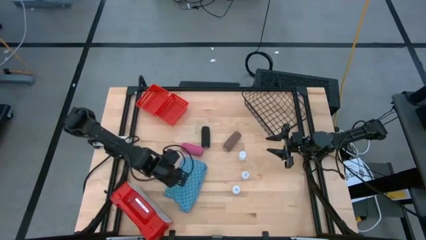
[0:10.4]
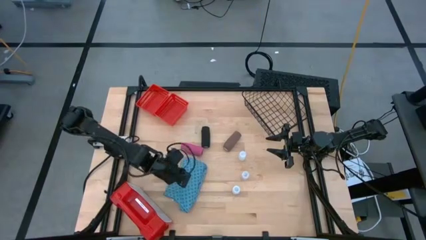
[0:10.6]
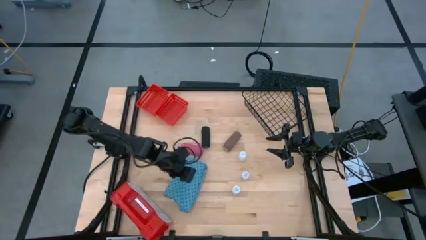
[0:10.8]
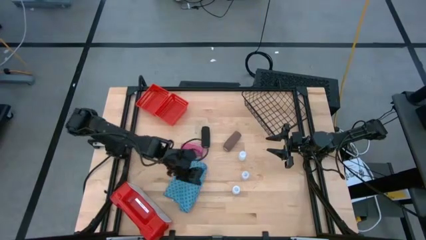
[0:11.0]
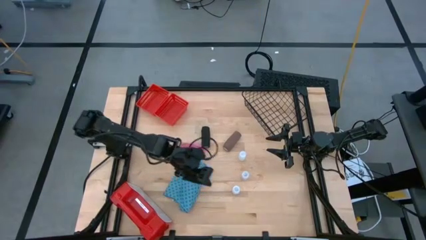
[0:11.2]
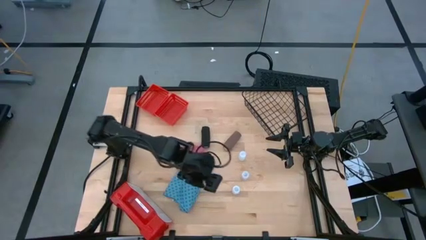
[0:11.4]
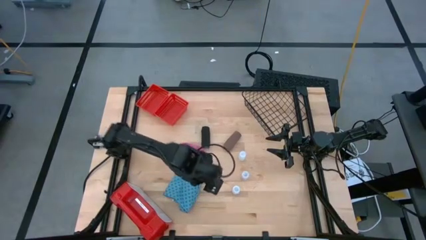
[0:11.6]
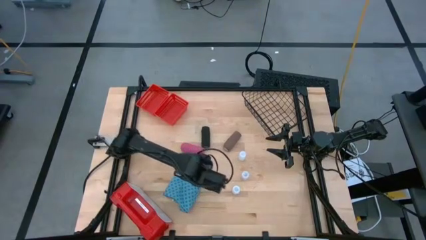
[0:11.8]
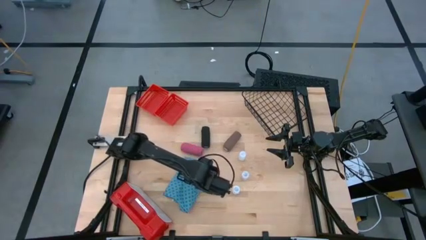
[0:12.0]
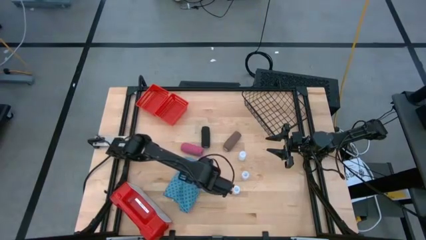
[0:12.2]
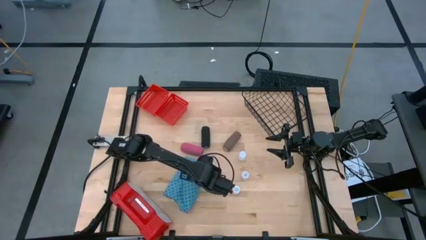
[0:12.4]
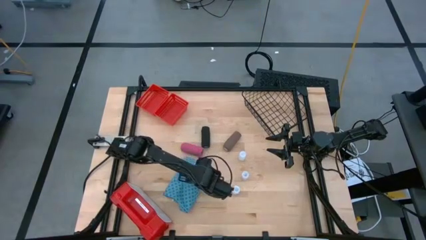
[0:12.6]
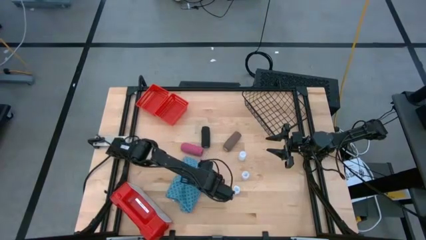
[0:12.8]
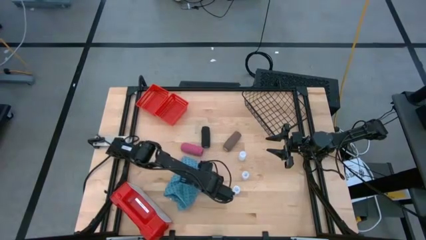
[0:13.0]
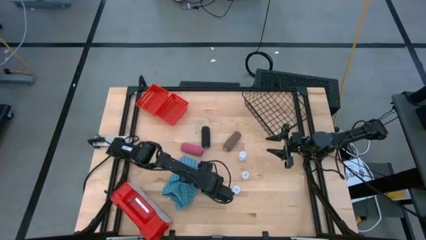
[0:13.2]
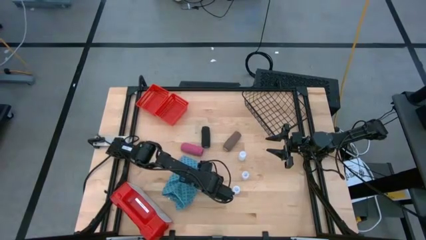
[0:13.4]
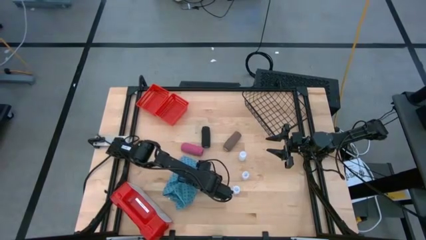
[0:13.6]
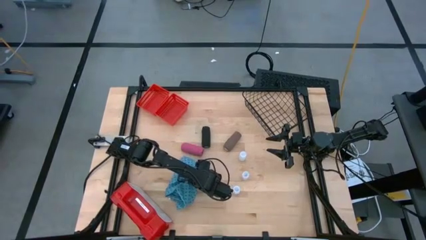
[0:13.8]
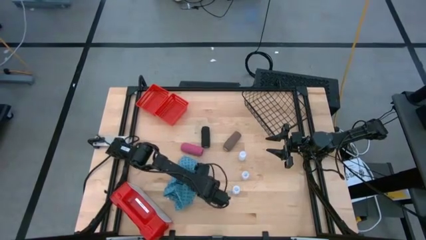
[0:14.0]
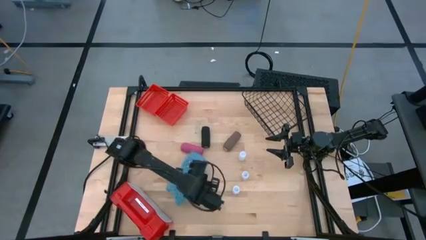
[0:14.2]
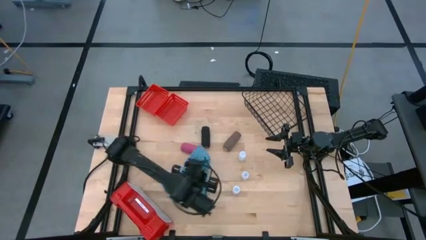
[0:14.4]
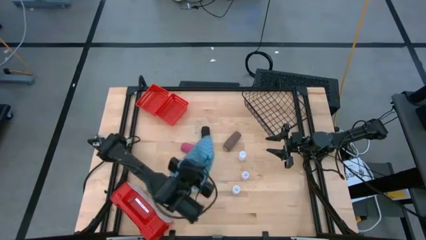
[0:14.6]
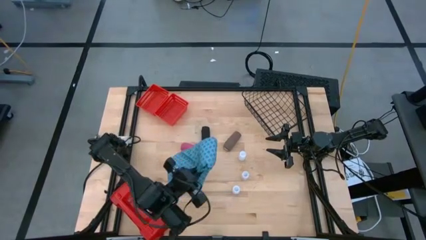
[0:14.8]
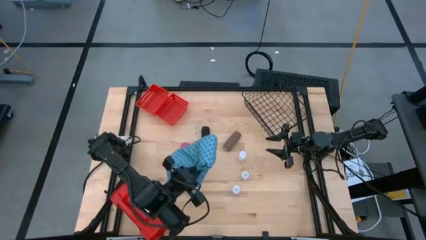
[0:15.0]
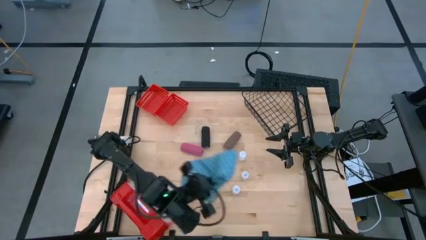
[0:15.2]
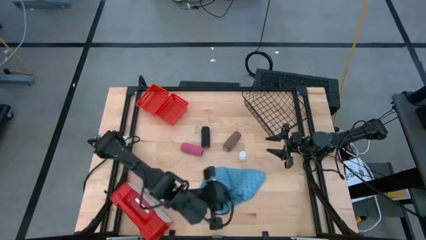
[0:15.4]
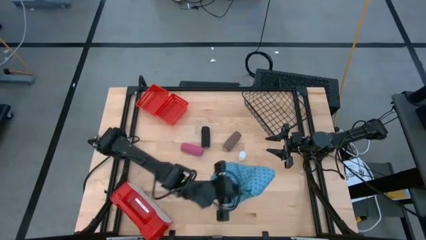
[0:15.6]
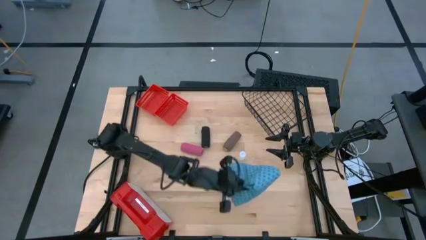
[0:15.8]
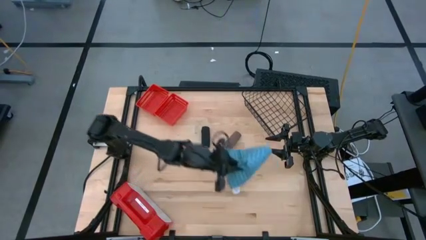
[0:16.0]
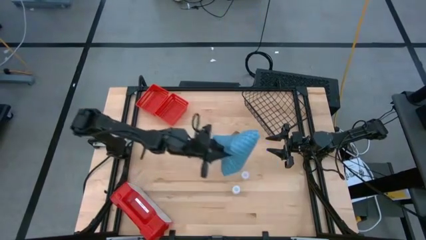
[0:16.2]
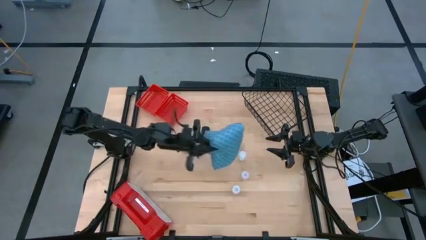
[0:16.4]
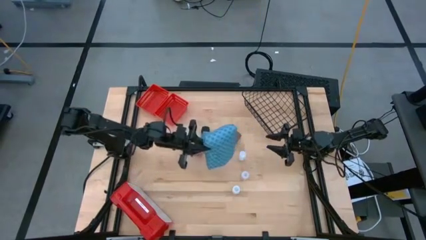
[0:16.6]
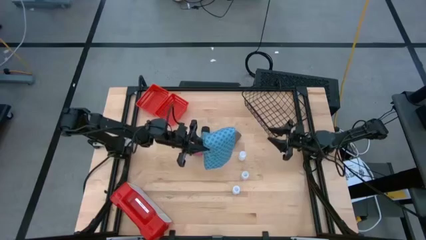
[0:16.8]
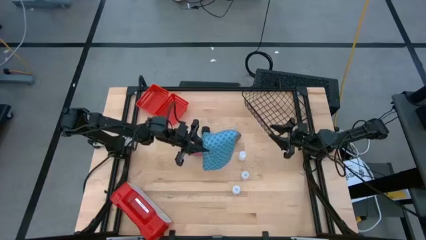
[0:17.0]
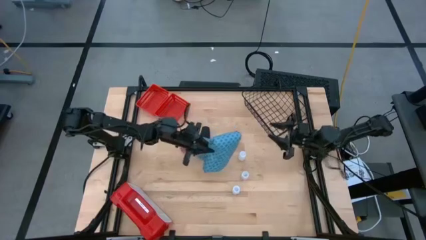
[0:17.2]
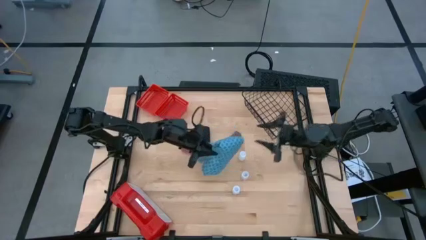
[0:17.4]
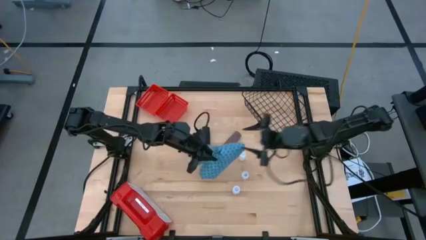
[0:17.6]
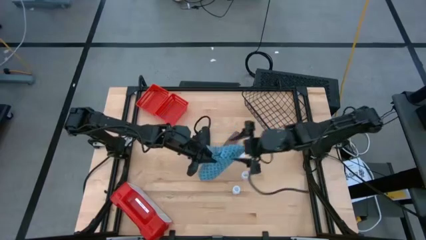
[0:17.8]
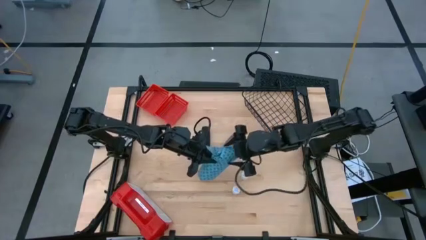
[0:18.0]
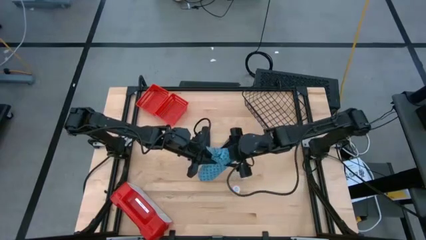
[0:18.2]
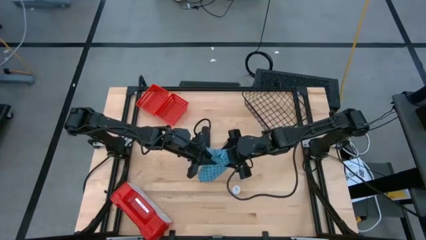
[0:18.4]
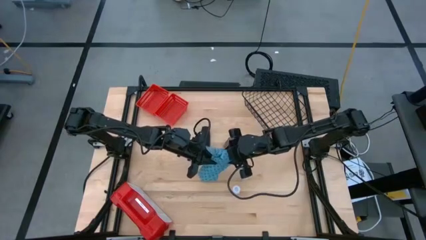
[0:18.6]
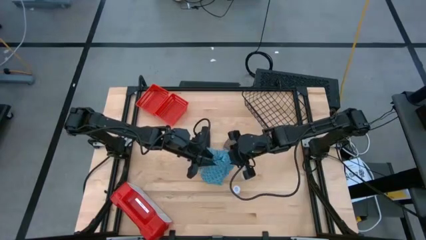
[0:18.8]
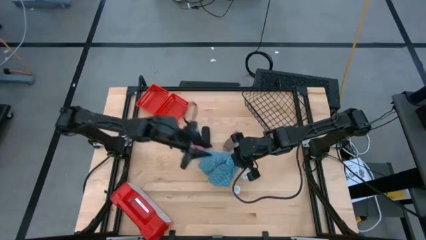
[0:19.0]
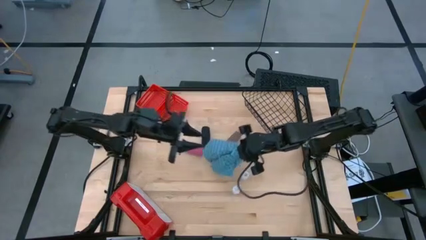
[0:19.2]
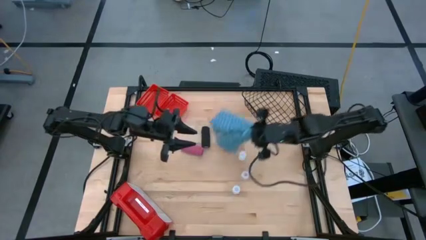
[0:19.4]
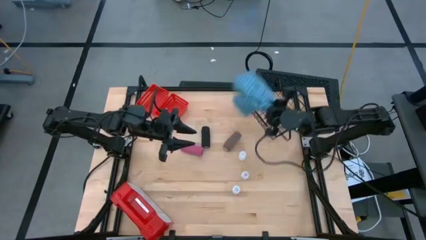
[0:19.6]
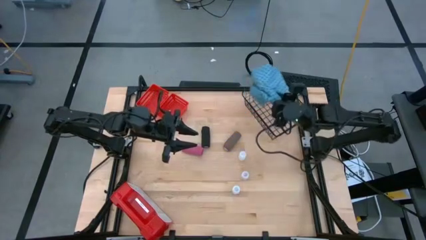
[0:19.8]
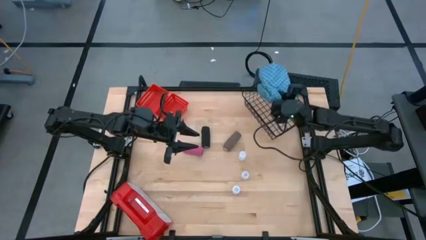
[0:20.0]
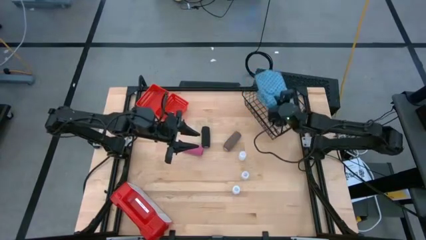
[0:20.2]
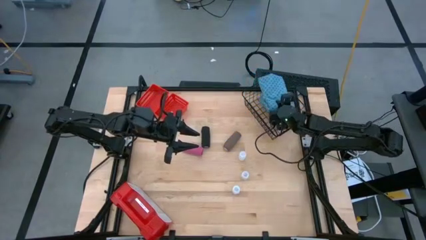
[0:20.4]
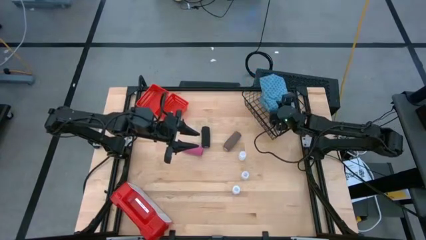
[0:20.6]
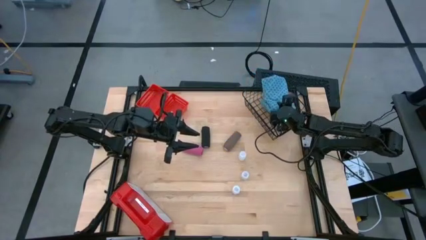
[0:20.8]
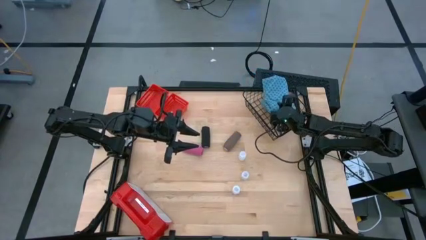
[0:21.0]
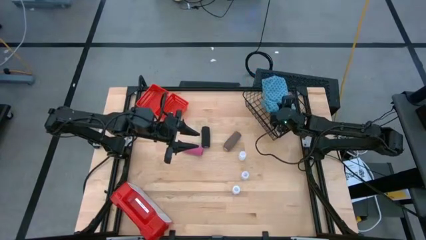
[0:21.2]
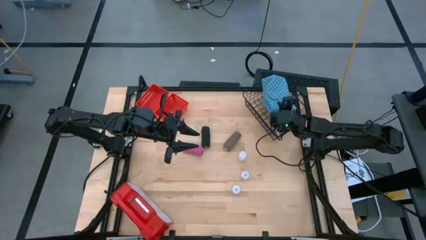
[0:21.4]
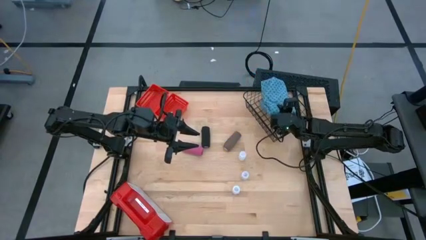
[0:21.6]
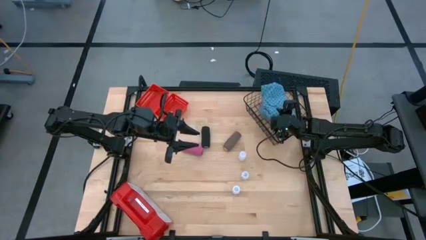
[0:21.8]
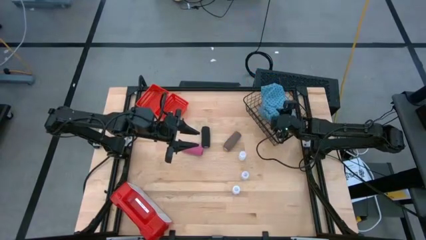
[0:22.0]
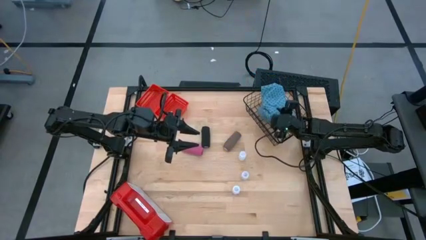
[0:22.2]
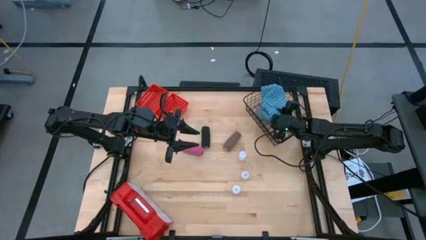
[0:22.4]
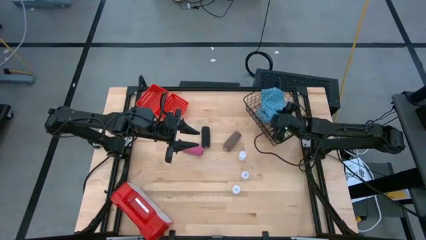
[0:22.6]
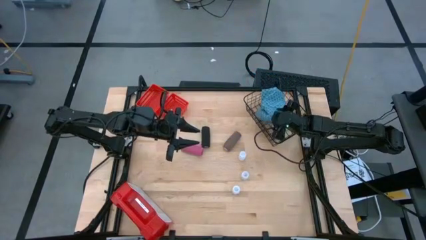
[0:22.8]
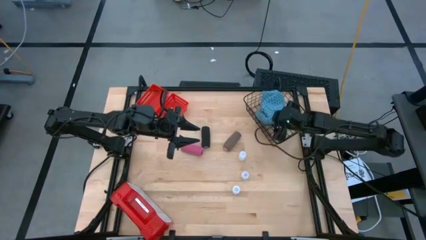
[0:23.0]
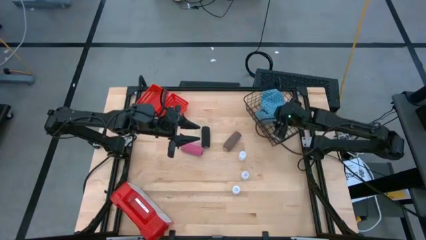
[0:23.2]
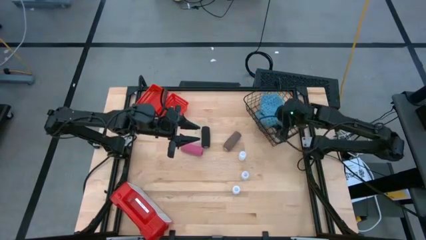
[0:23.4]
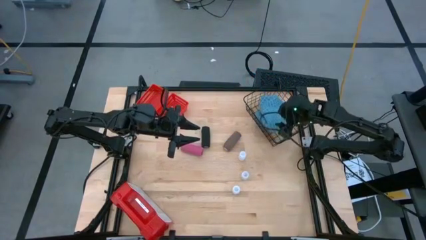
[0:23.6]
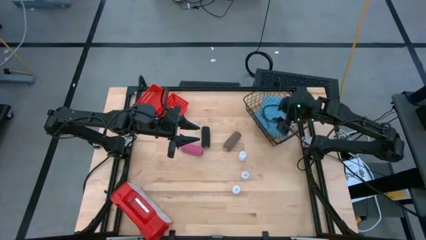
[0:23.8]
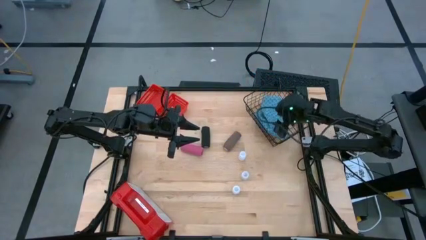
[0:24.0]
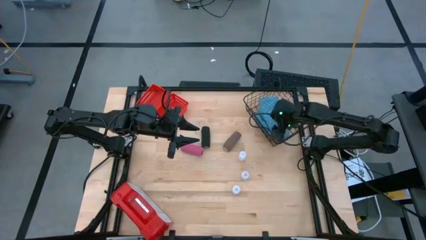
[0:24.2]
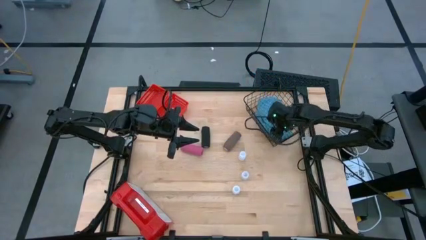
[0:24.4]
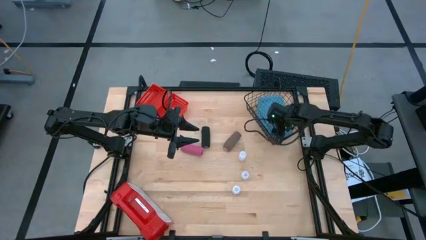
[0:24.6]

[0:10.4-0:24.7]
Task: Pick & place medical supplies in basket/bin
Put the blue patient gown into the wire basket
